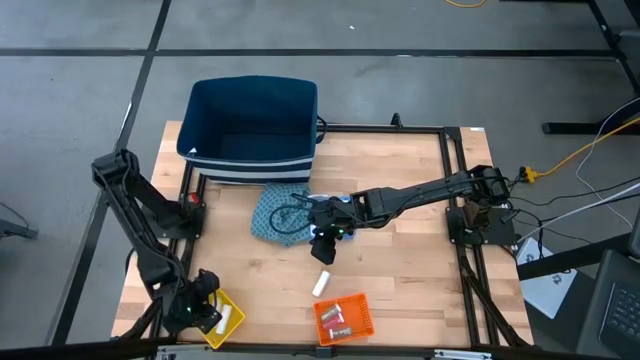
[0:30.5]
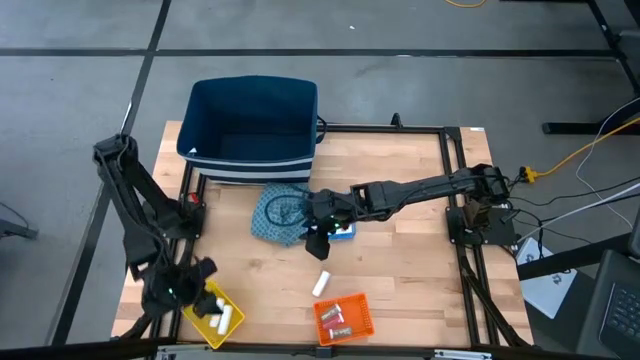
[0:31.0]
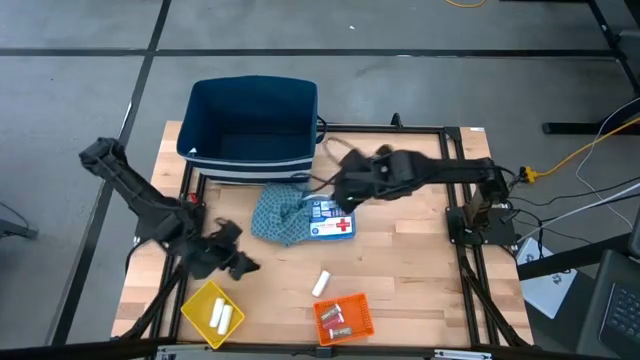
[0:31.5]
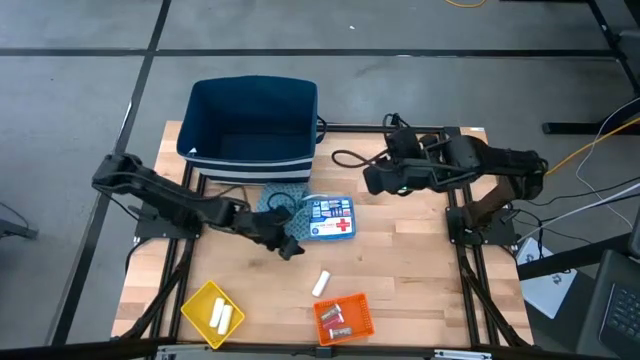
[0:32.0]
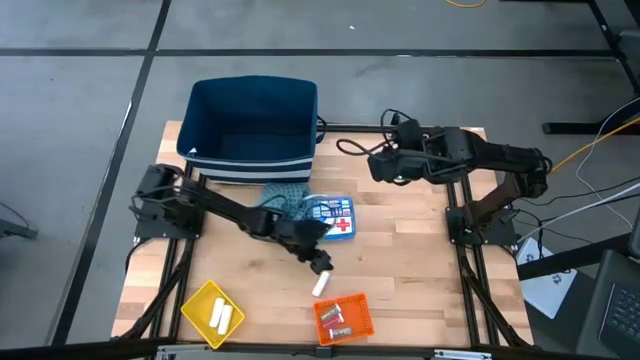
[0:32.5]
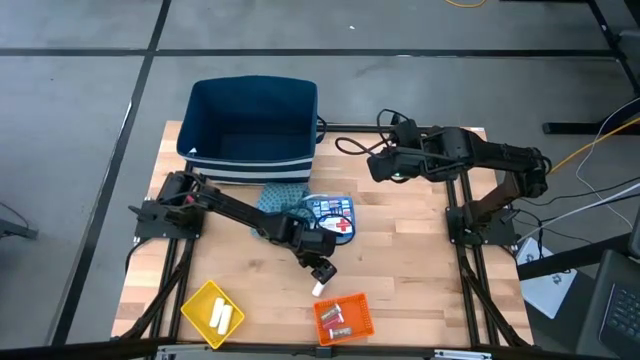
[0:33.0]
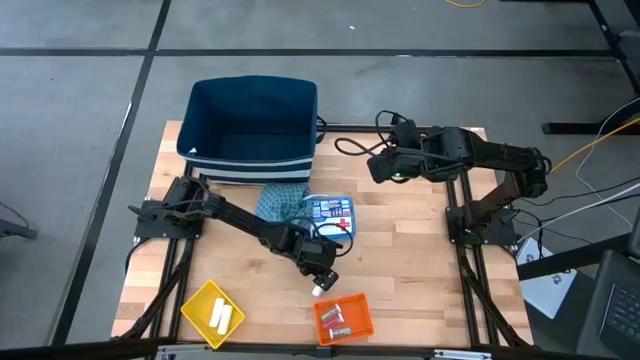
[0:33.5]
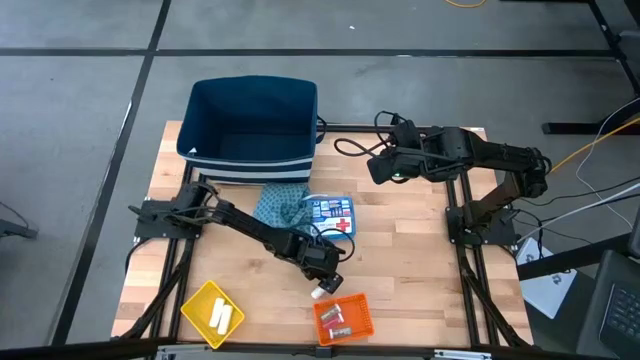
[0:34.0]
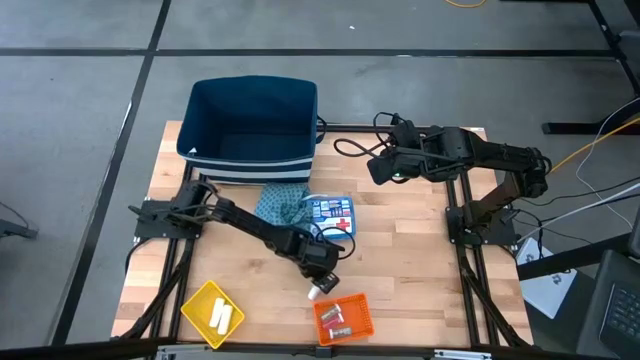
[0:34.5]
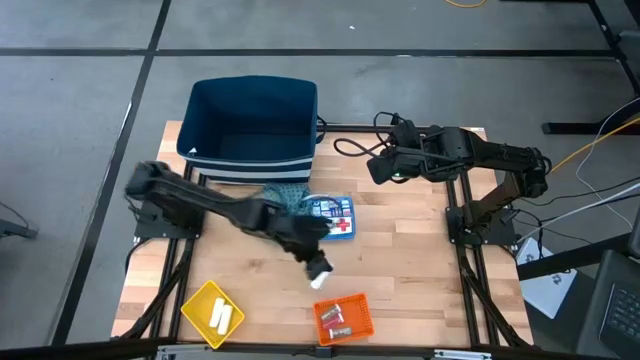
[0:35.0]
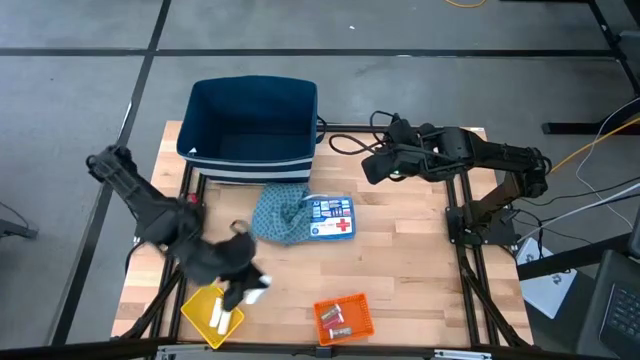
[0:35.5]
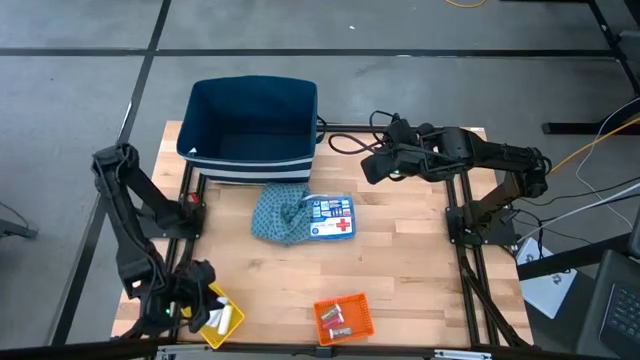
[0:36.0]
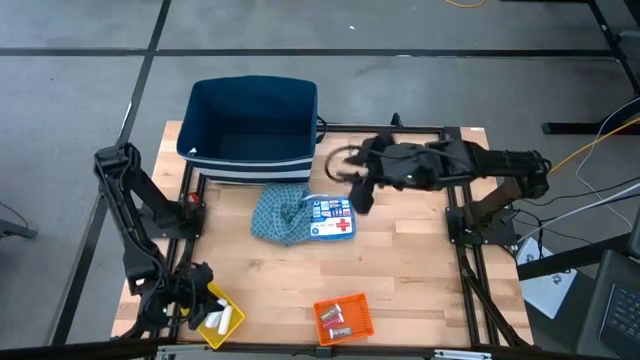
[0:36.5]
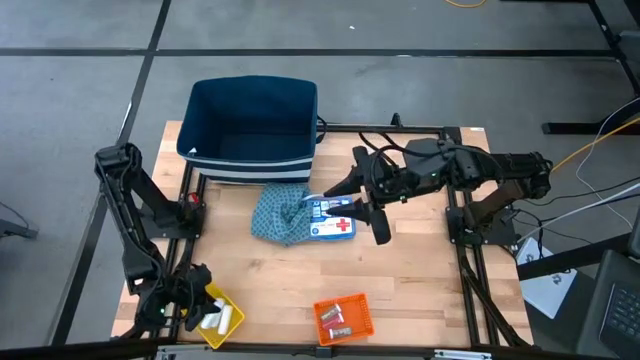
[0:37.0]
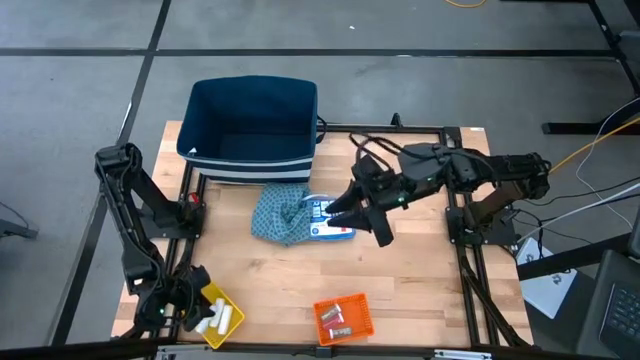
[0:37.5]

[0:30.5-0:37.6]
Task: Pick & Place Medicine items
Put the white rolled gauze into the yellow bin

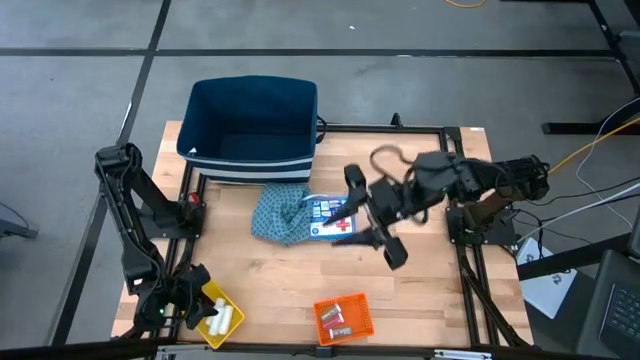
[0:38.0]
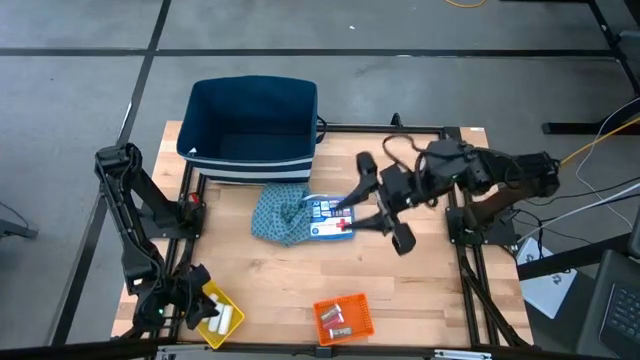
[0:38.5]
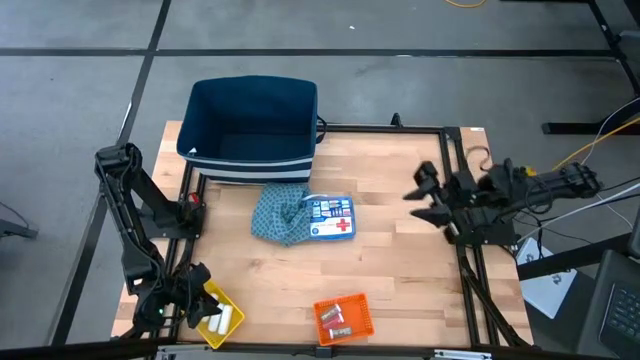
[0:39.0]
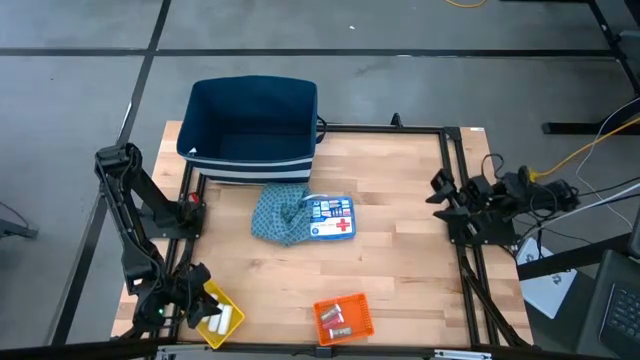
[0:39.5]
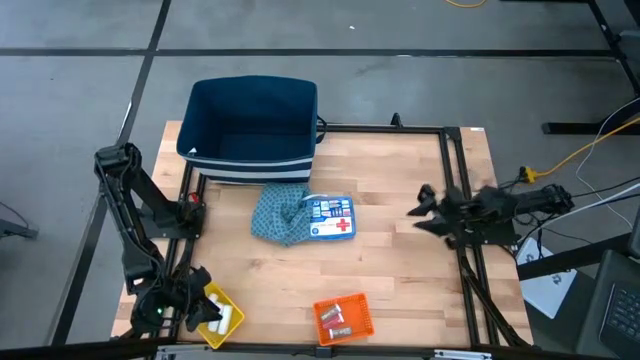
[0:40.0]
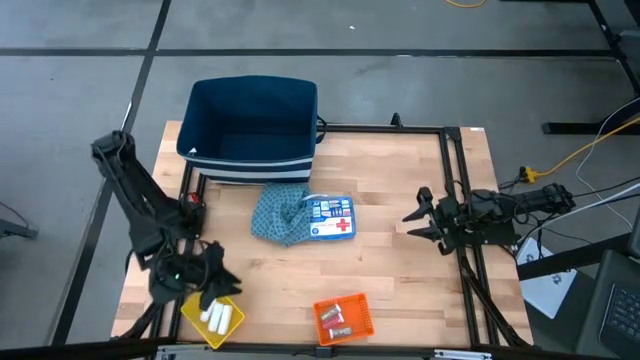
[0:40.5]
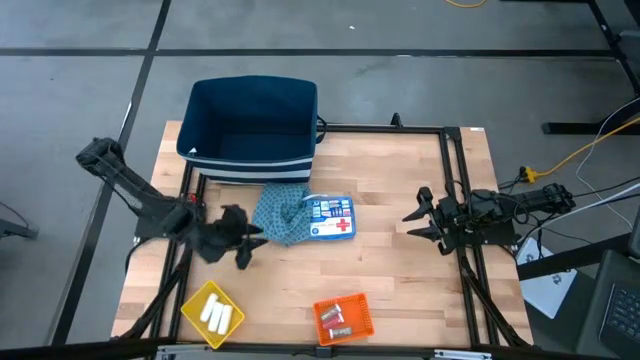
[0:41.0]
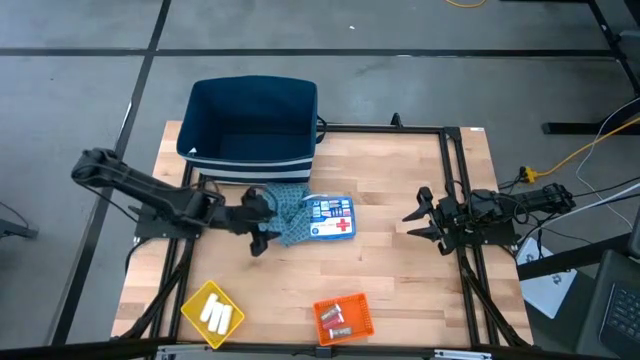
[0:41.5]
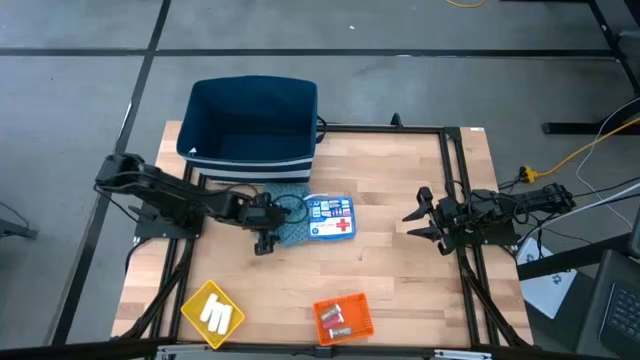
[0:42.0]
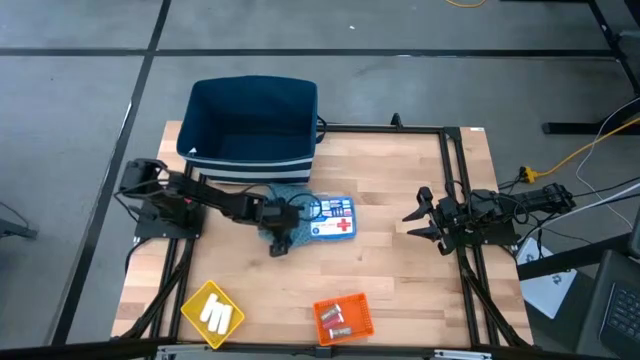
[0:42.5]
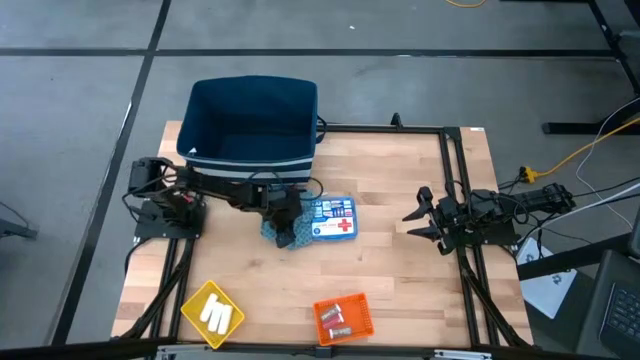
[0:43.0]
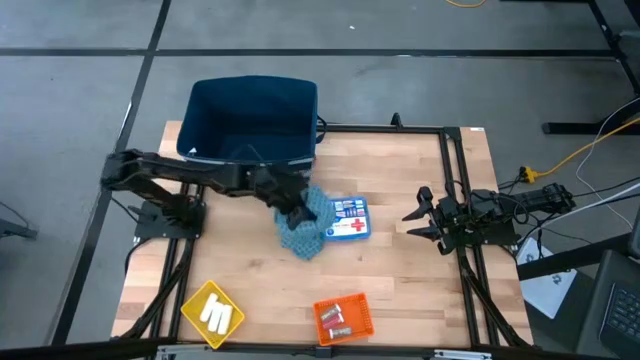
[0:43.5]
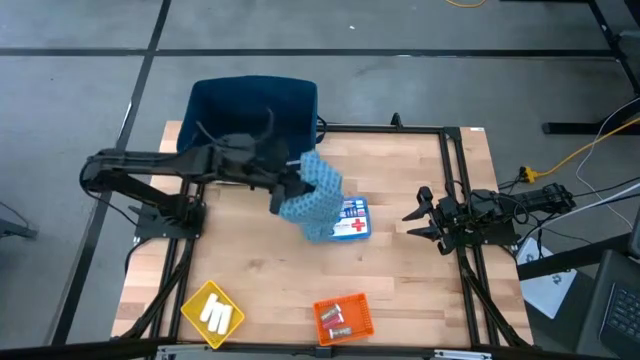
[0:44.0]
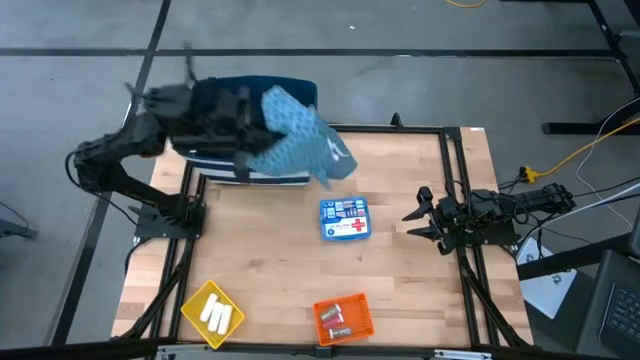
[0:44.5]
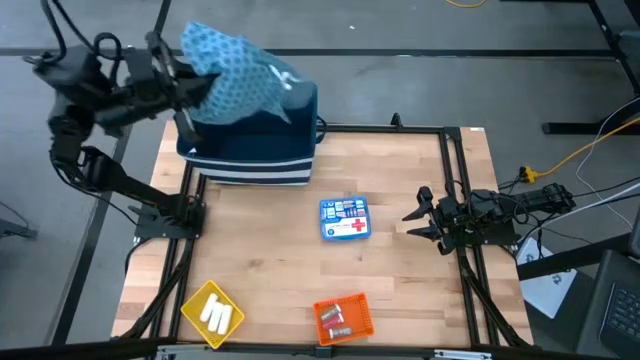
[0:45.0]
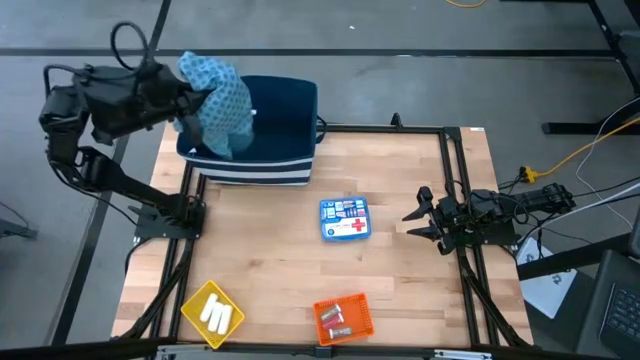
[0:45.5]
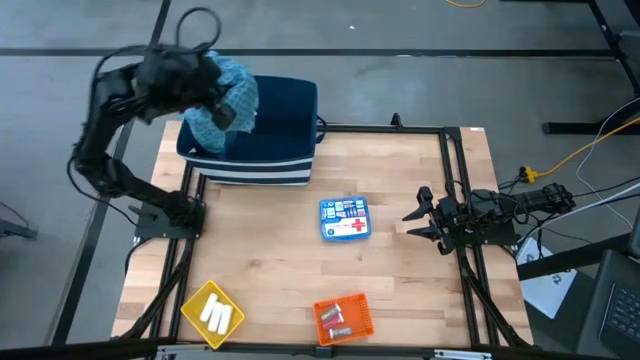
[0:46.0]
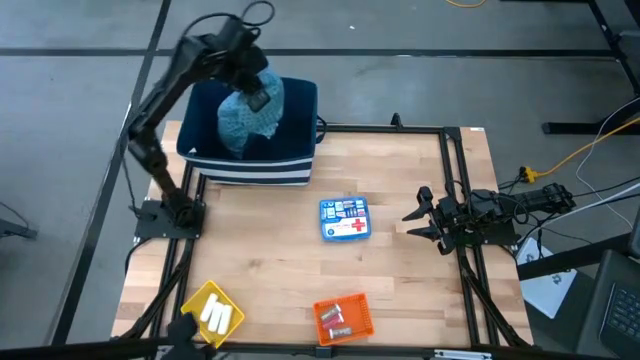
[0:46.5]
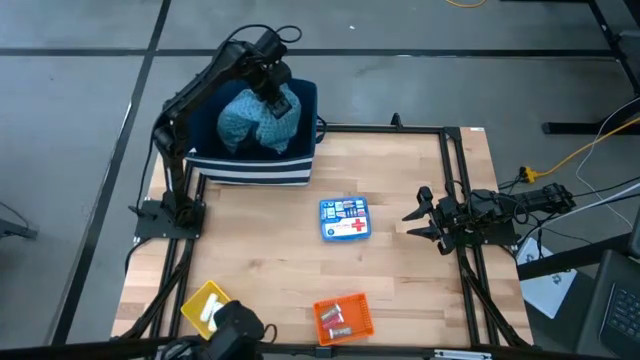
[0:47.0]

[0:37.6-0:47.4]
Put the blue patient gown into the blue and white bin

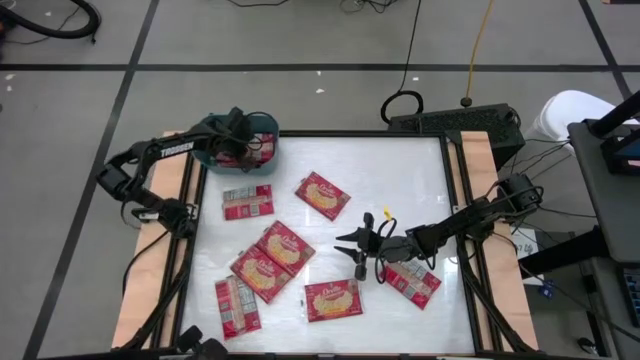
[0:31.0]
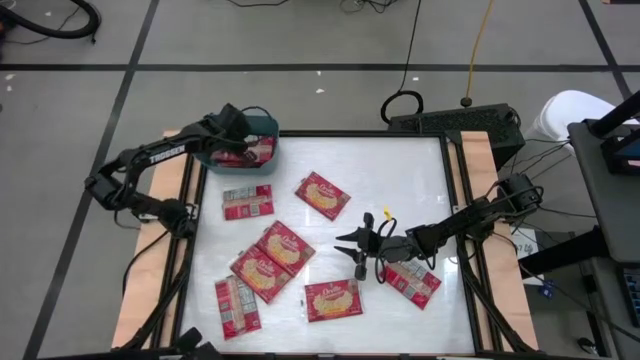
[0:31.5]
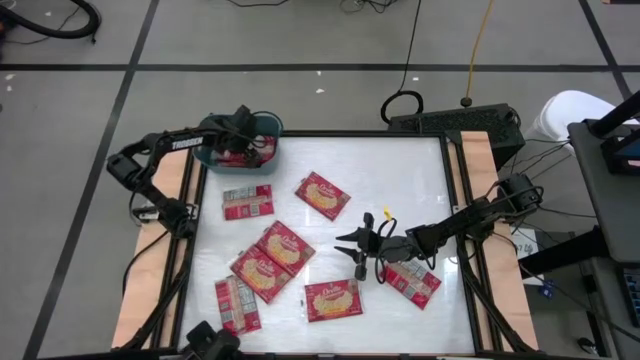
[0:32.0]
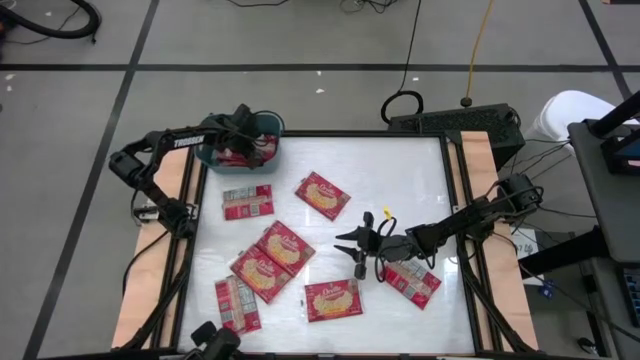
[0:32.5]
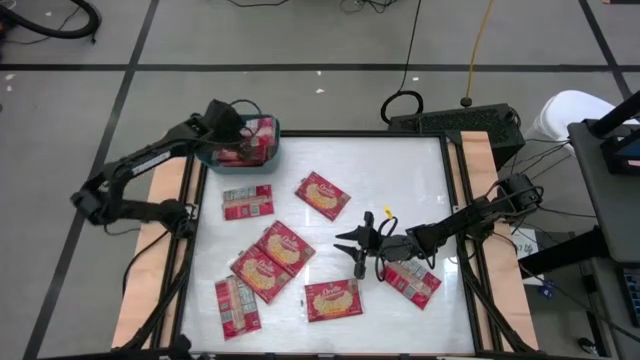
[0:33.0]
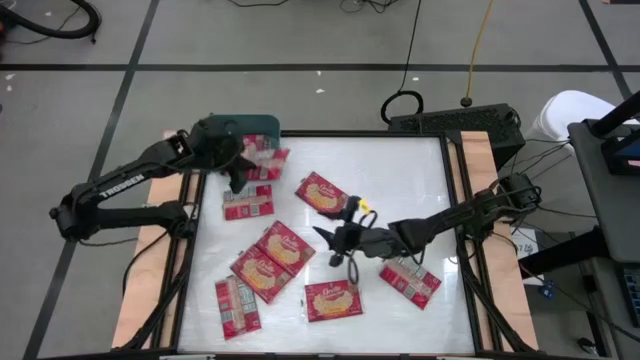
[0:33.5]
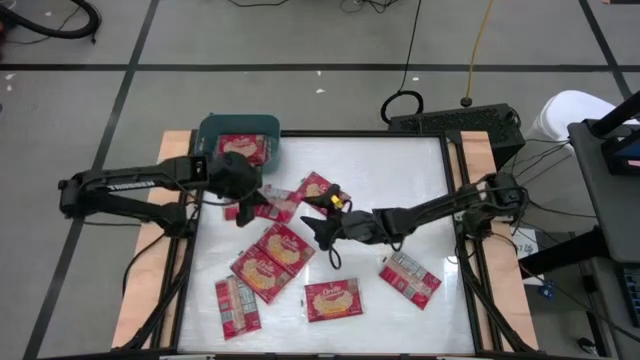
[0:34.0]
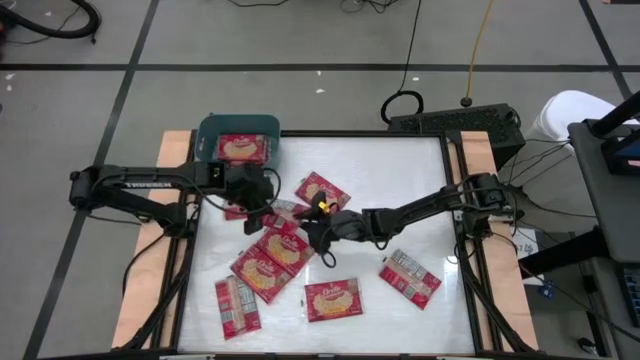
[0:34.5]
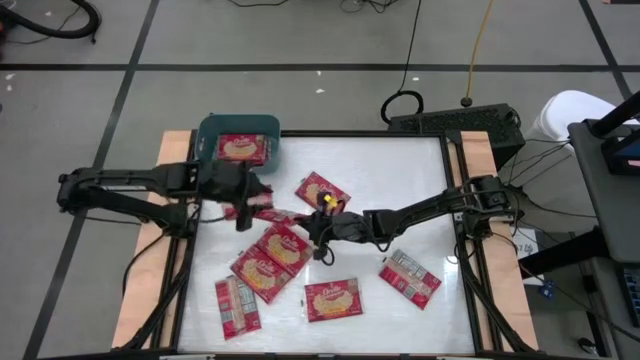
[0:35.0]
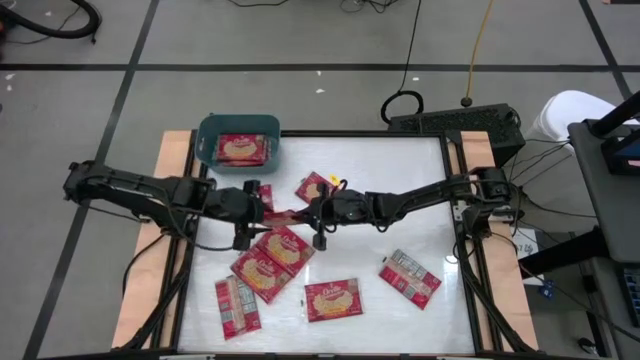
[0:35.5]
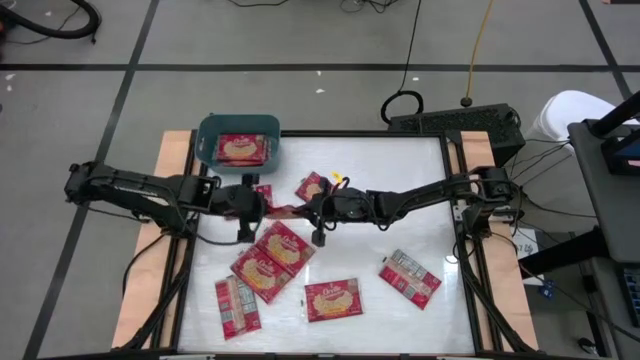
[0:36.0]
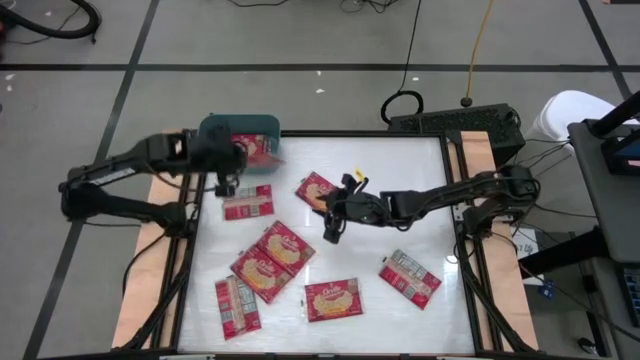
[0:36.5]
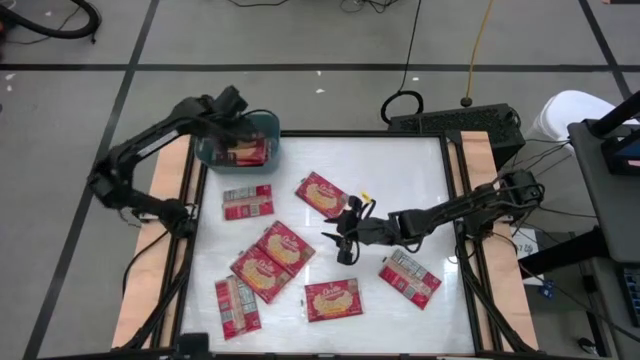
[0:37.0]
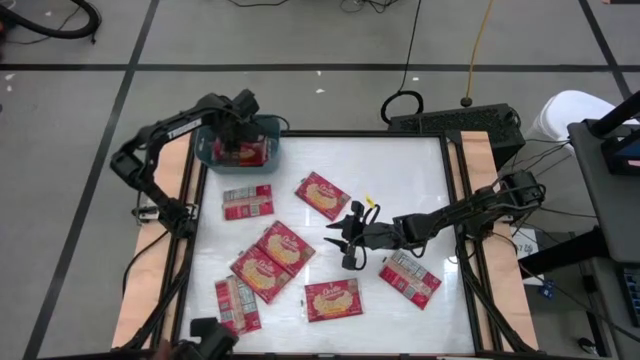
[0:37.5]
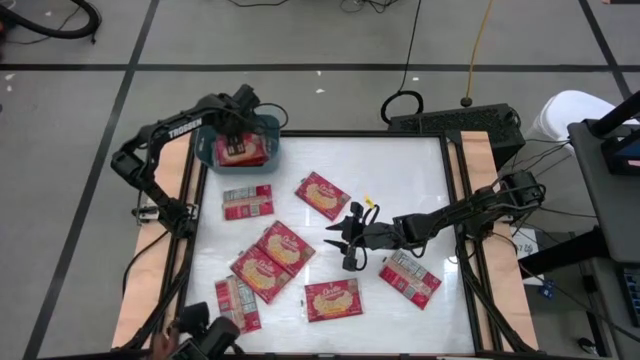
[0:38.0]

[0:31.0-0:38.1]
Task: Sort popcorn bags into baskets
Put the red popcorn bag into the blue bin
